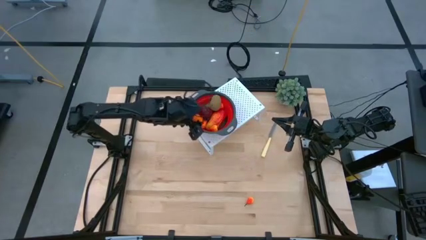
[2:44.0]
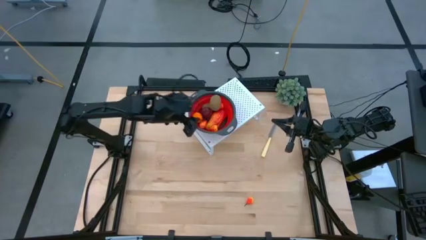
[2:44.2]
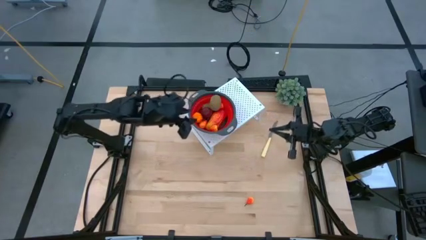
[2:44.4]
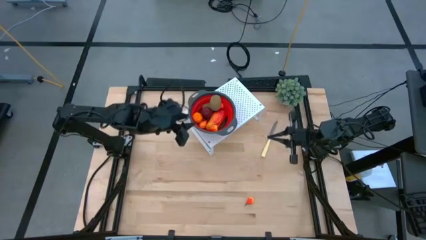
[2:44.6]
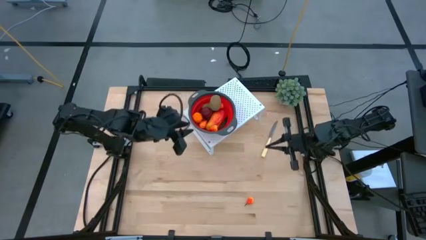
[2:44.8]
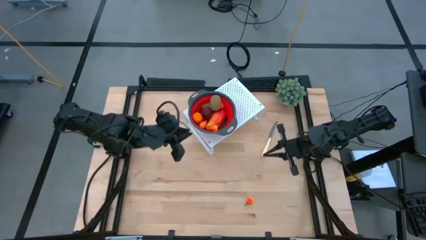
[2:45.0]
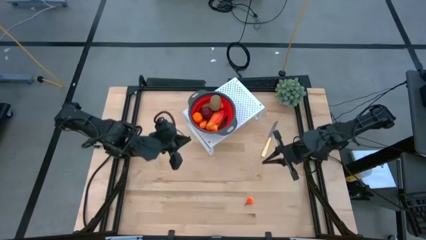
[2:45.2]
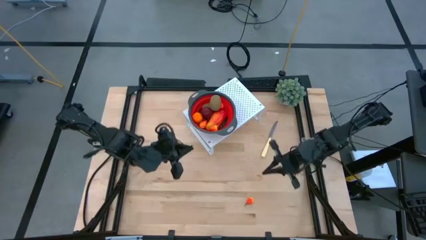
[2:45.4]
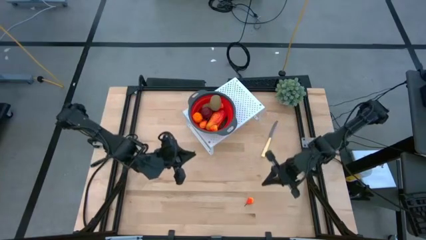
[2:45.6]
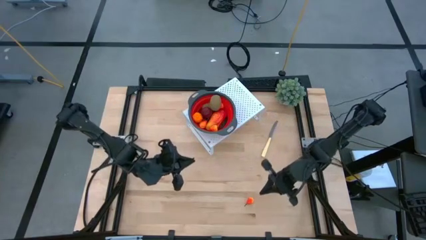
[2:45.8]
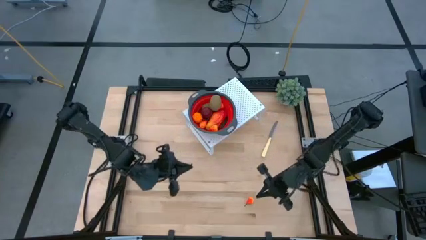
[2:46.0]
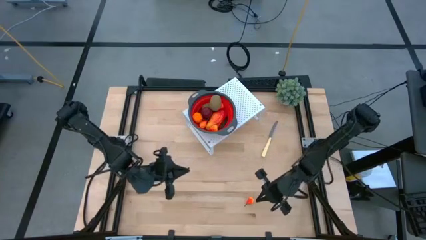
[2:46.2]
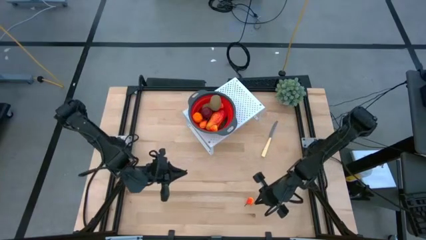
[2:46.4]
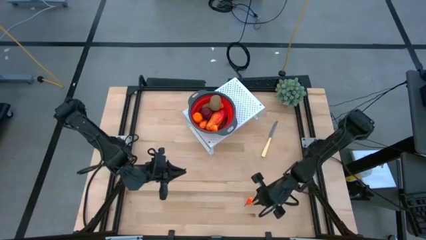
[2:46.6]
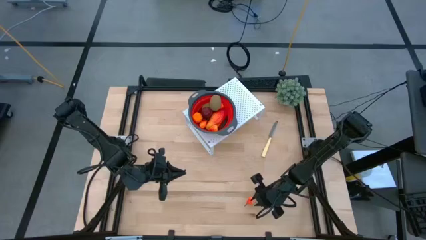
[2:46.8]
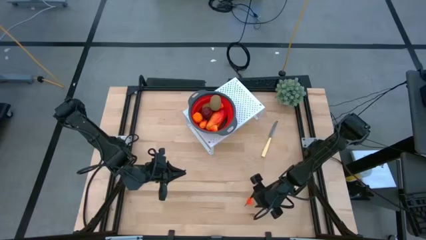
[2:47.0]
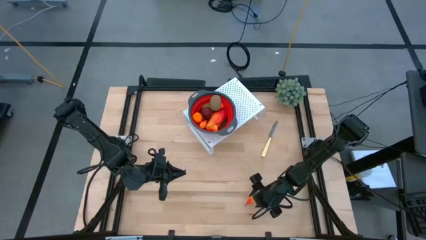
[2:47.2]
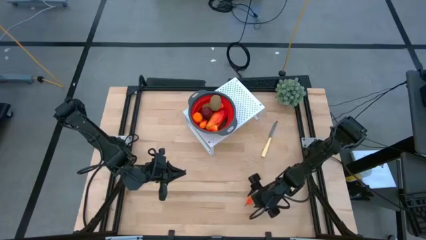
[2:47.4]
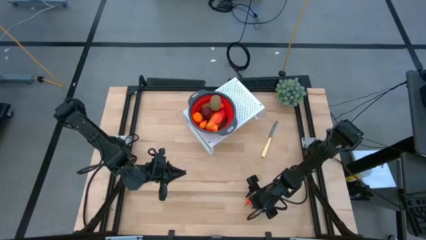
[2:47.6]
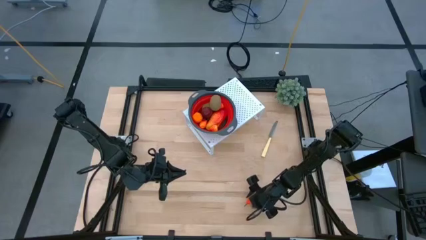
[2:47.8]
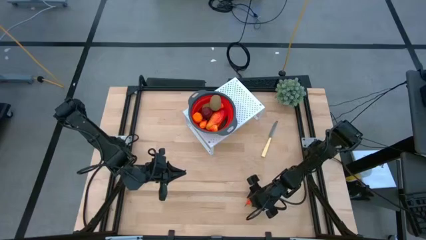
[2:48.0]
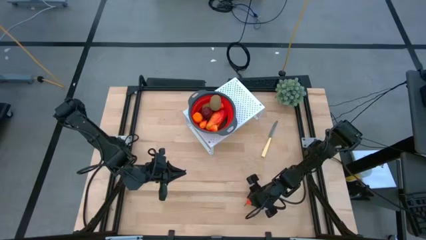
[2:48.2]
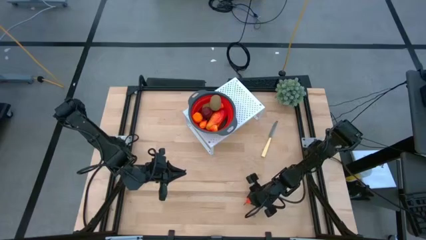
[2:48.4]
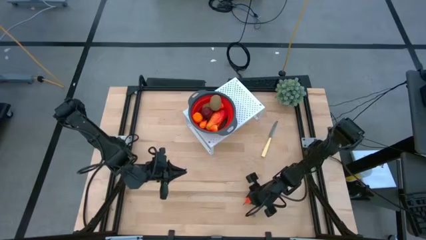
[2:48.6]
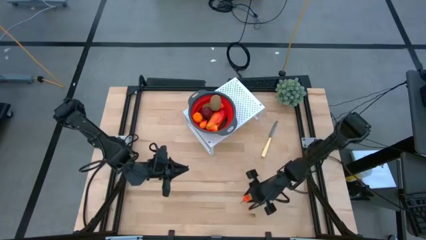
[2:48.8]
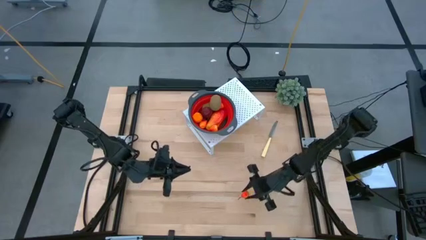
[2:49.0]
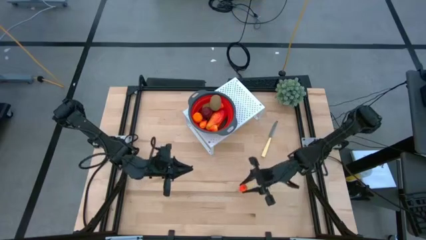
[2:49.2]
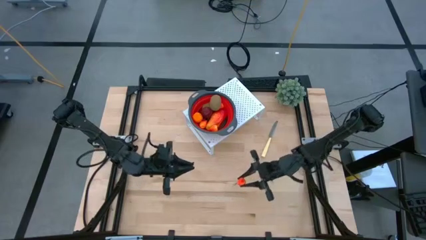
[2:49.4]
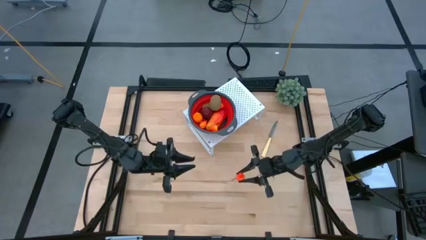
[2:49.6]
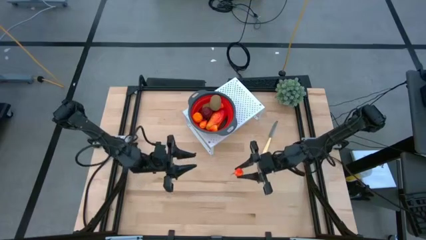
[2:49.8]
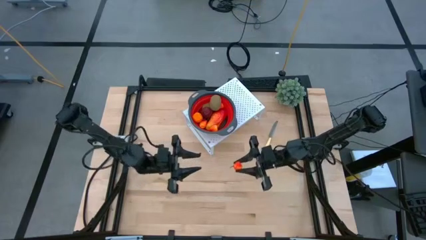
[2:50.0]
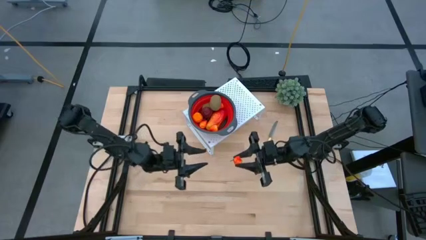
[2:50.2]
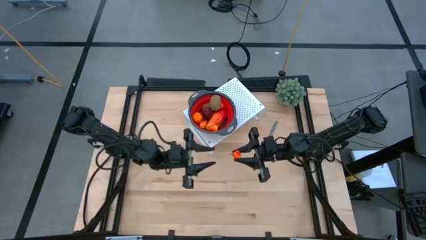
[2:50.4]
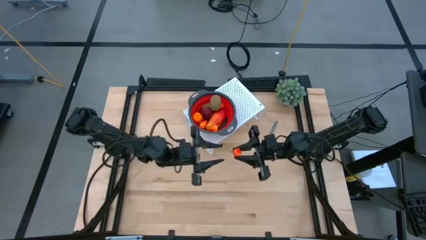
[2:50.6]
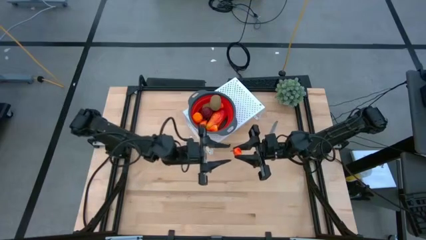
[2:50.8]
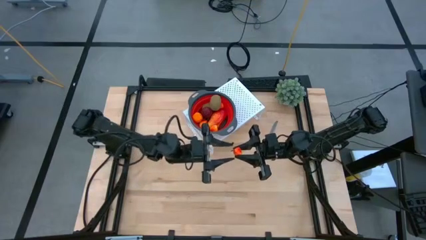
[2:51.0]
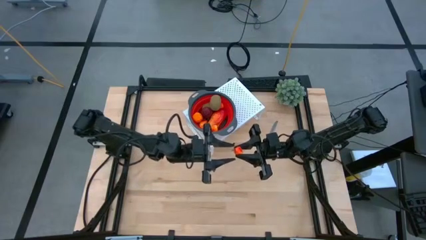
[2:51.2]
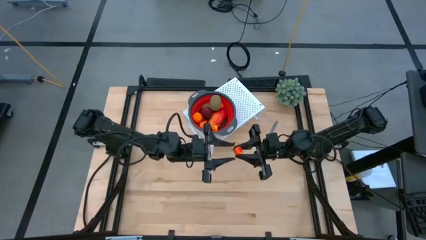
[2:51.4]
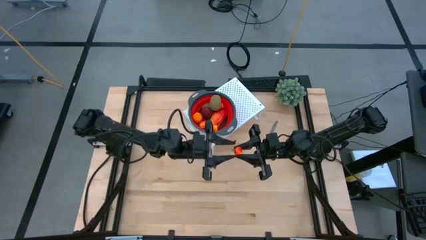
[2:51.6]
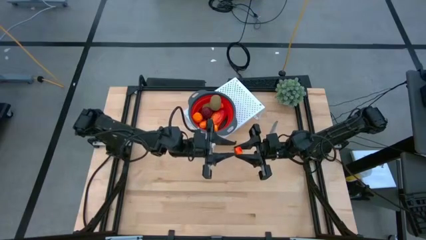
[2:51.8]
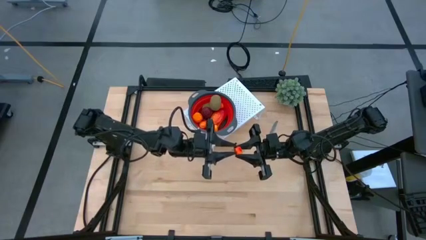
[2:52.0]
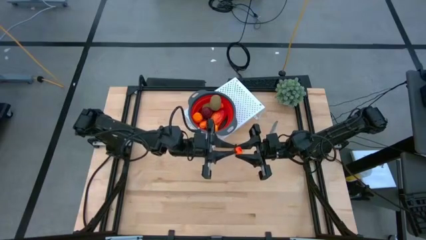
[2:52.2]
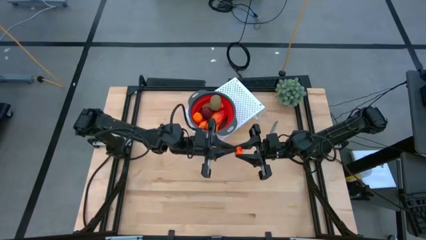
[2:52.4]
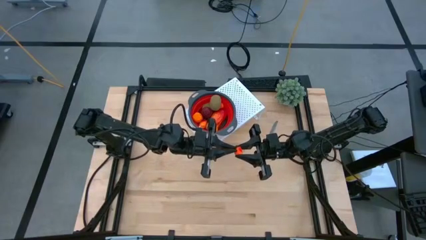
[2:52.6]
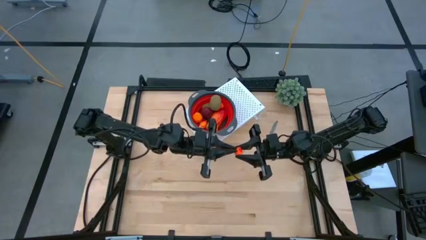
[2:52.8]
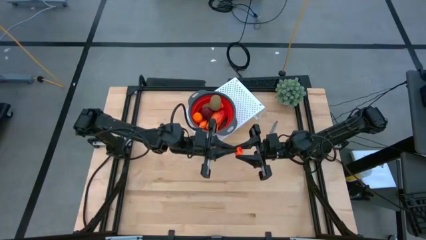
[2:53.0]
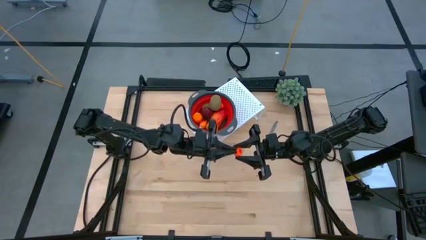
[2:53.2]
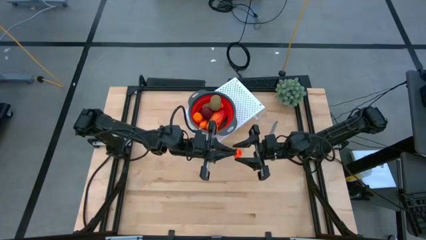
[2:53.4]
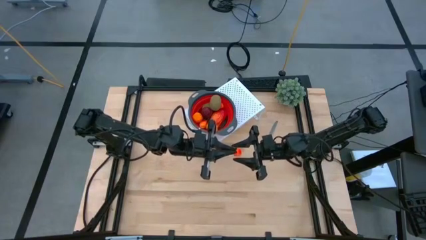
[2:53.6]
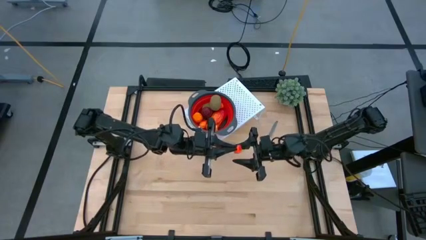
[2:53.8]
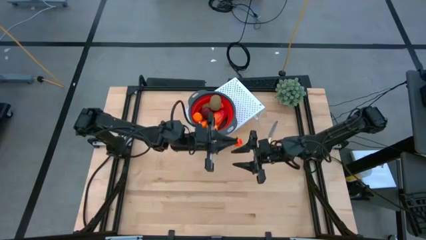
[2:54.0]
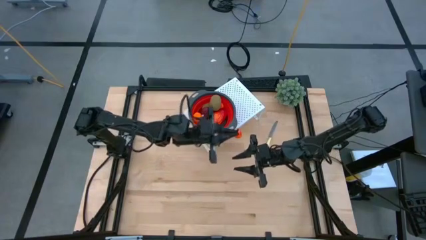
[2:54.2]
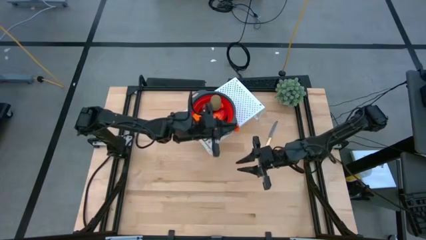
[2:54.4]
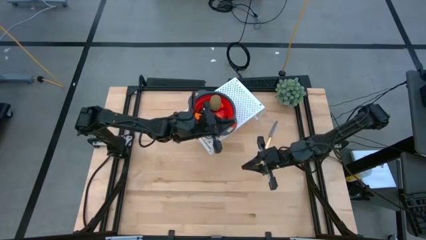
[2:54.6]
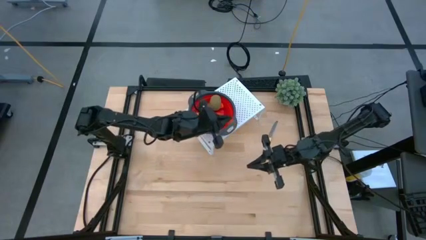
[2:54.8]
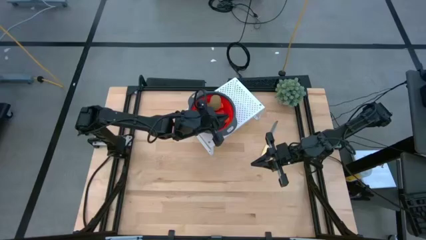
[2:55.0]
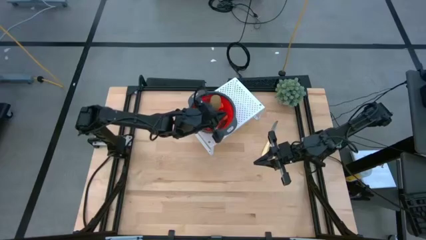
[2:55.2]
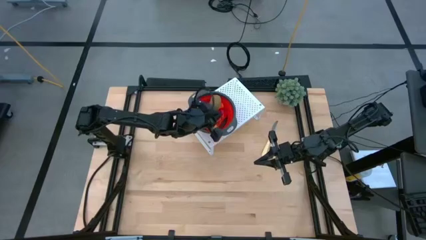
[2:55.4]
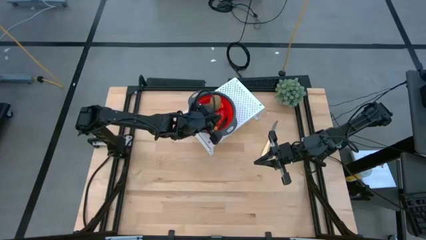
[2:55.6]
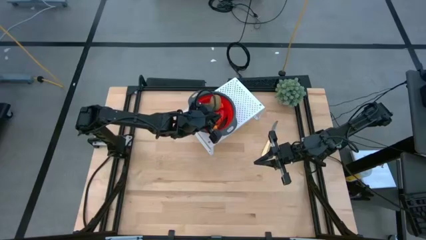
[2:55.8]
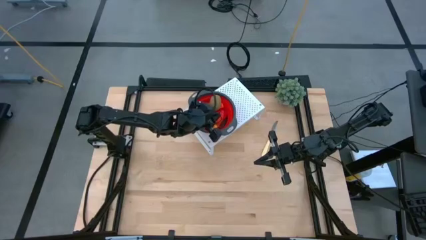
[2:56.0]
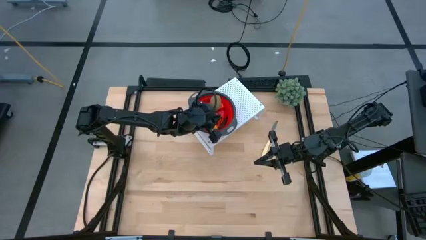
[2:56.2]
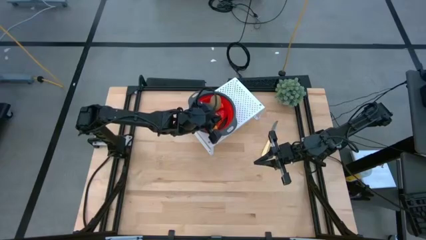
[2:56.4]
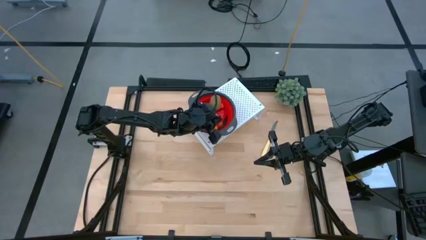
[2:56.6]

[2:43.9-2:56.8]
Task: Pick & Place Fruit
Put the peach into the red strainer bowl on the shelf
